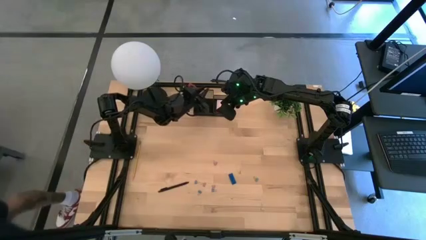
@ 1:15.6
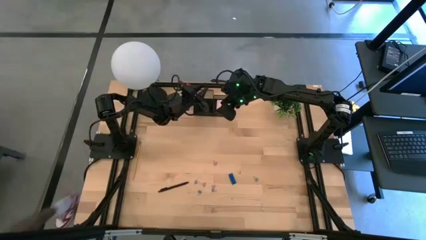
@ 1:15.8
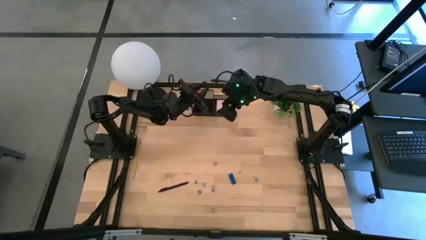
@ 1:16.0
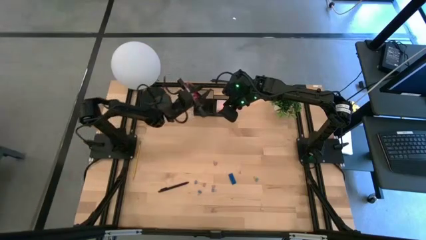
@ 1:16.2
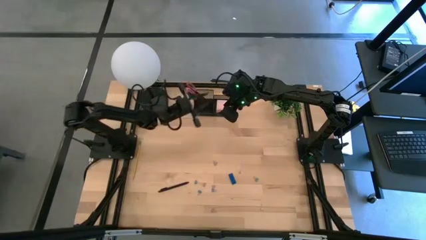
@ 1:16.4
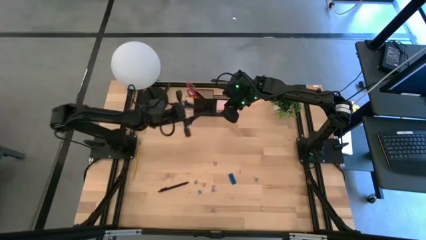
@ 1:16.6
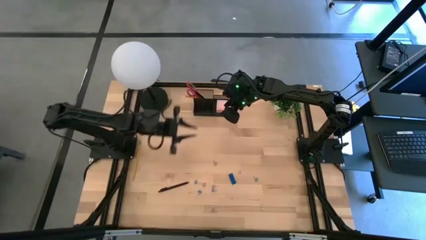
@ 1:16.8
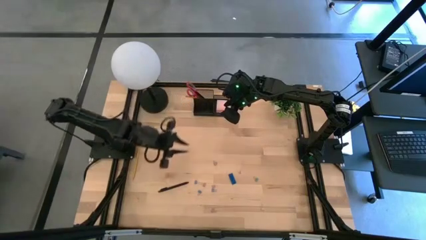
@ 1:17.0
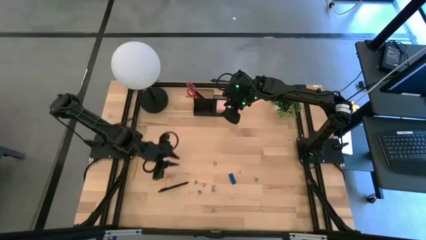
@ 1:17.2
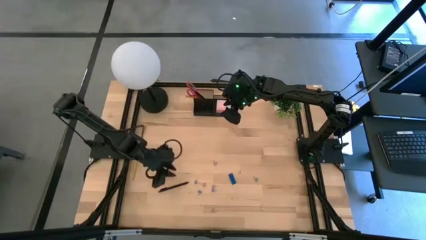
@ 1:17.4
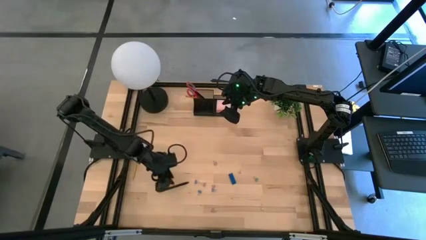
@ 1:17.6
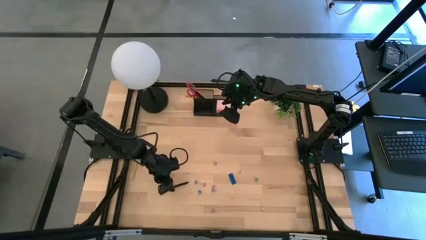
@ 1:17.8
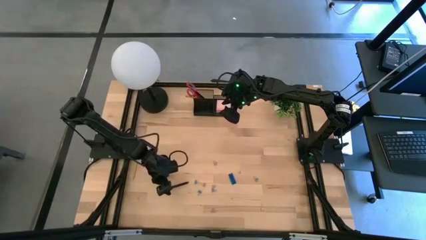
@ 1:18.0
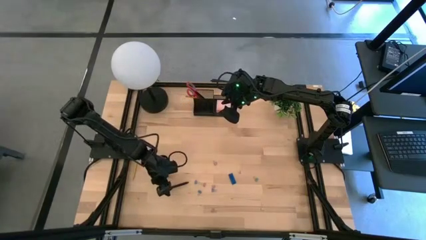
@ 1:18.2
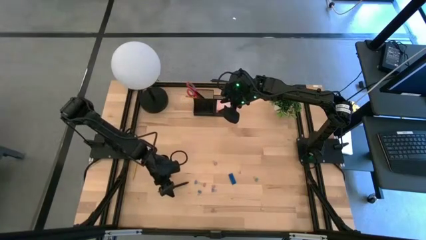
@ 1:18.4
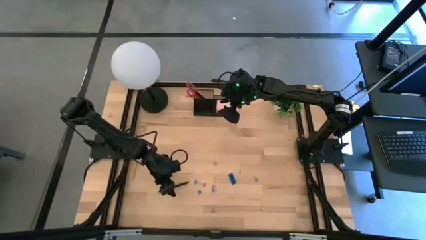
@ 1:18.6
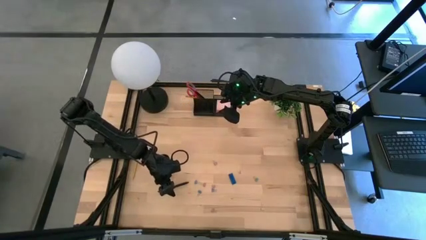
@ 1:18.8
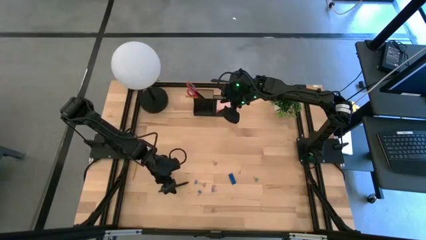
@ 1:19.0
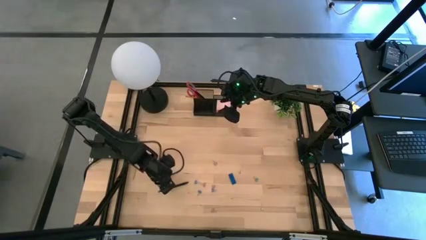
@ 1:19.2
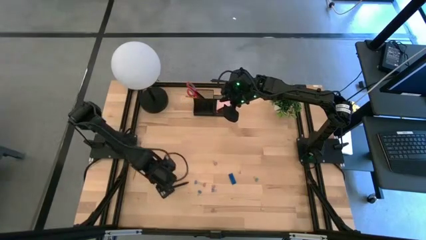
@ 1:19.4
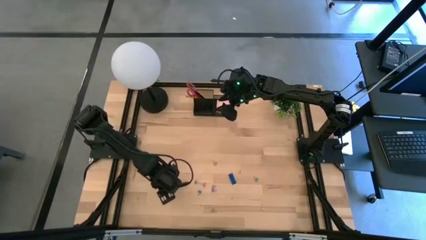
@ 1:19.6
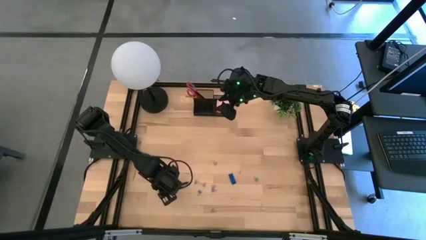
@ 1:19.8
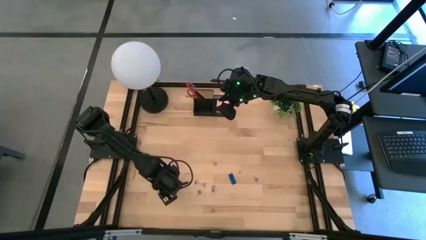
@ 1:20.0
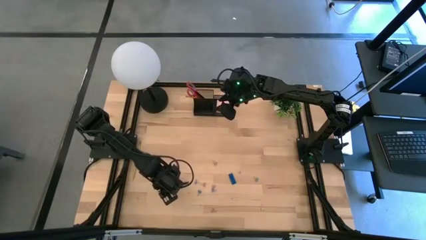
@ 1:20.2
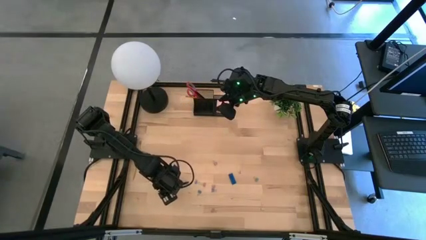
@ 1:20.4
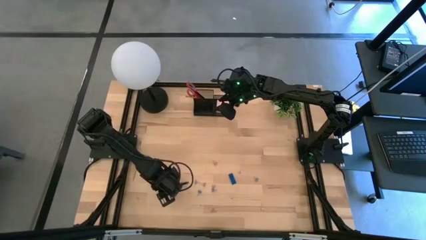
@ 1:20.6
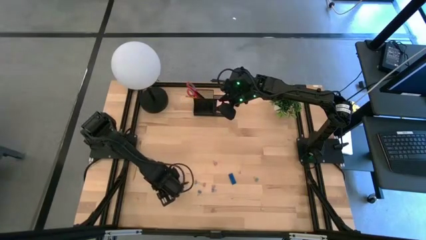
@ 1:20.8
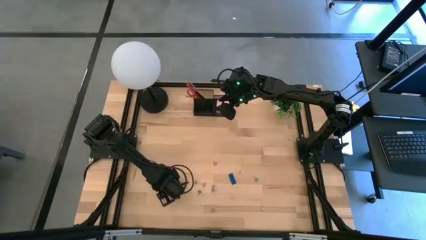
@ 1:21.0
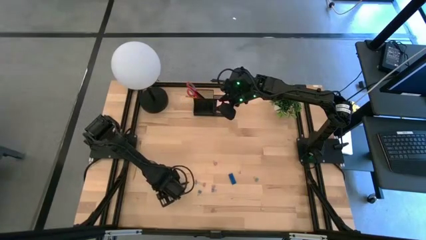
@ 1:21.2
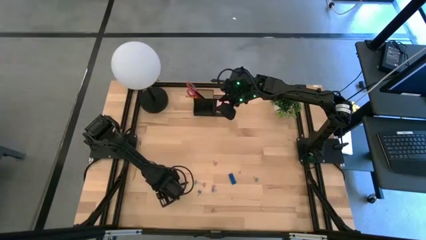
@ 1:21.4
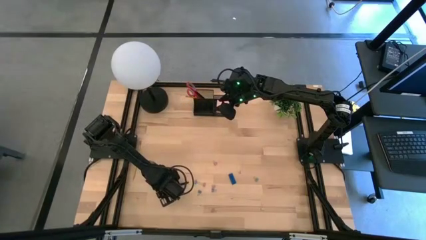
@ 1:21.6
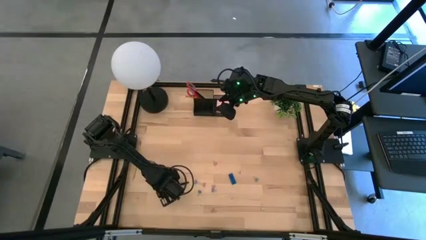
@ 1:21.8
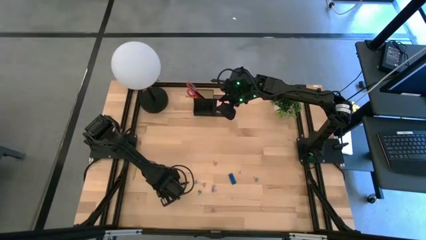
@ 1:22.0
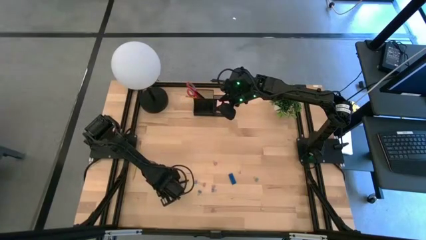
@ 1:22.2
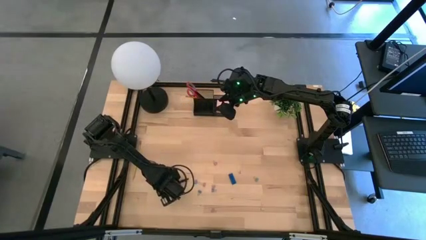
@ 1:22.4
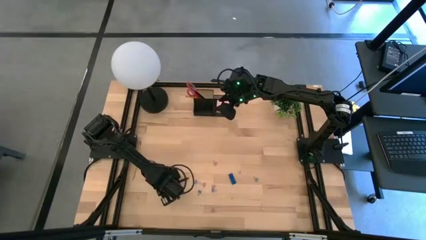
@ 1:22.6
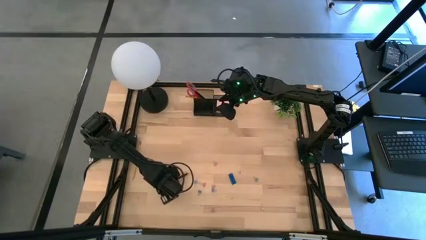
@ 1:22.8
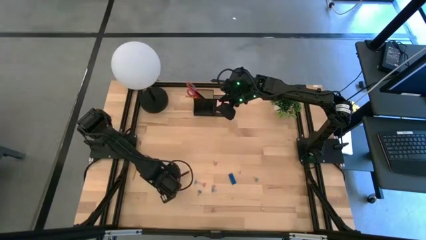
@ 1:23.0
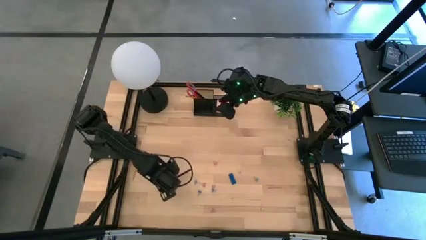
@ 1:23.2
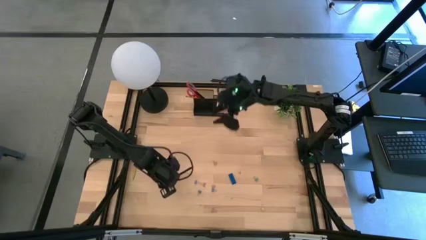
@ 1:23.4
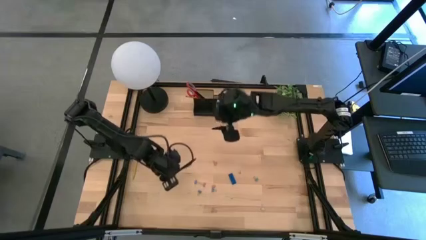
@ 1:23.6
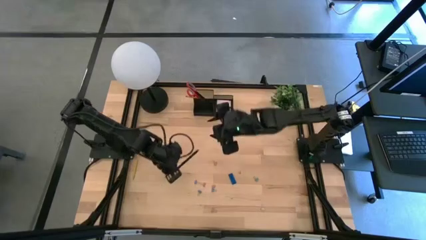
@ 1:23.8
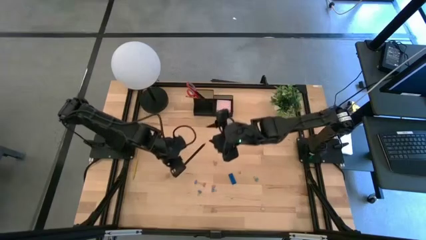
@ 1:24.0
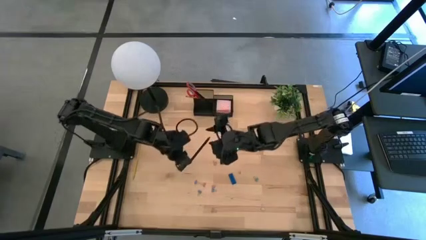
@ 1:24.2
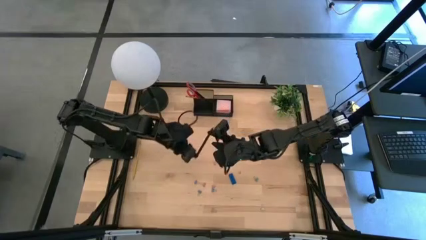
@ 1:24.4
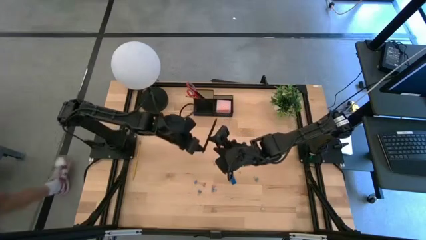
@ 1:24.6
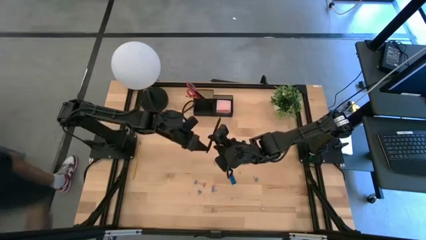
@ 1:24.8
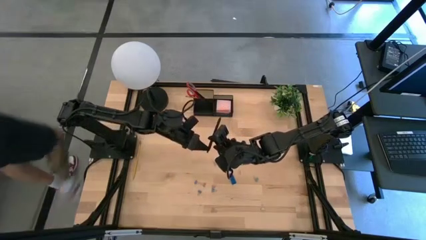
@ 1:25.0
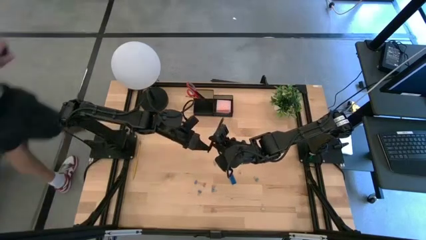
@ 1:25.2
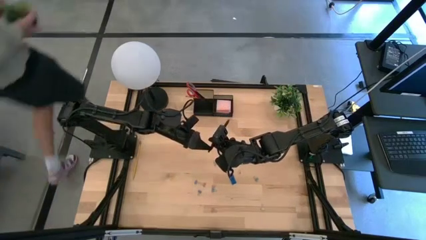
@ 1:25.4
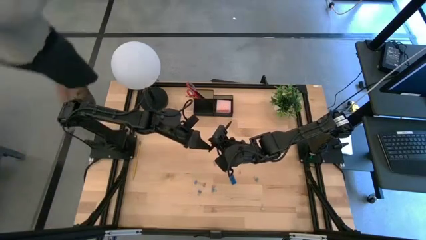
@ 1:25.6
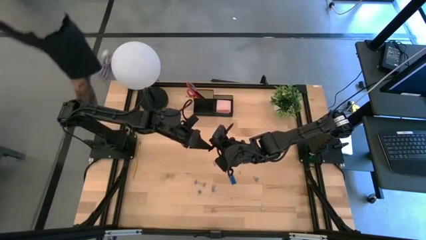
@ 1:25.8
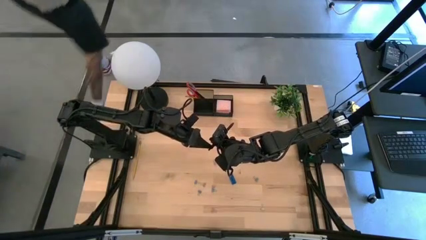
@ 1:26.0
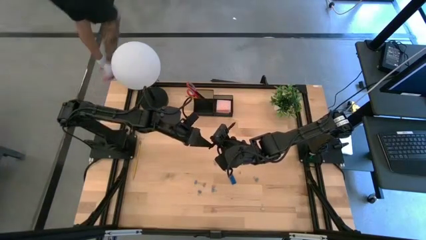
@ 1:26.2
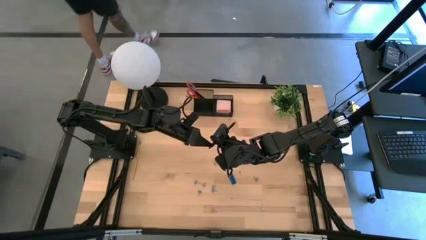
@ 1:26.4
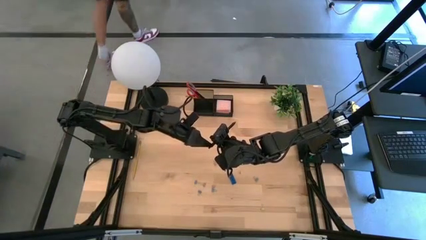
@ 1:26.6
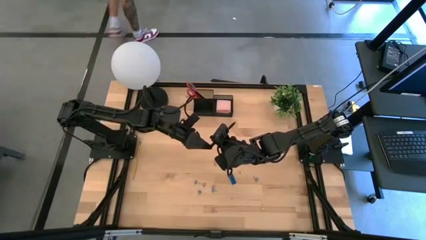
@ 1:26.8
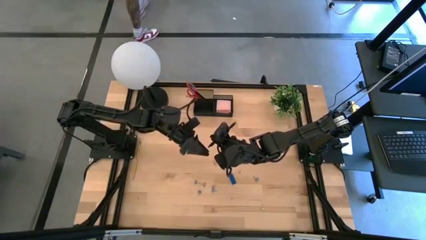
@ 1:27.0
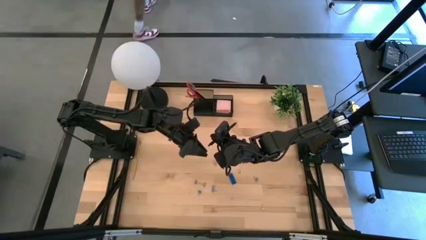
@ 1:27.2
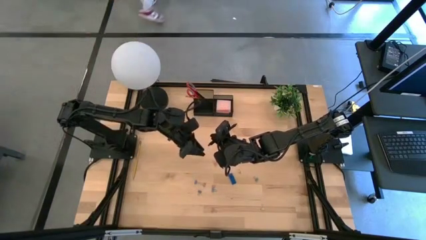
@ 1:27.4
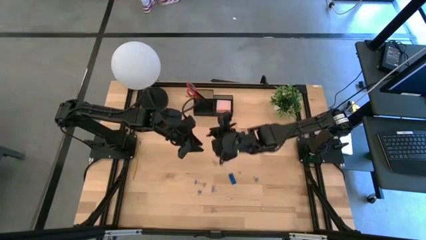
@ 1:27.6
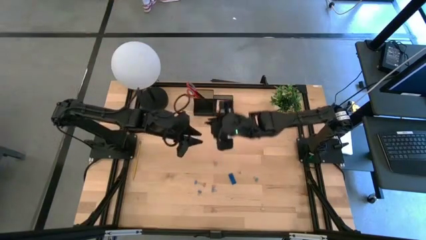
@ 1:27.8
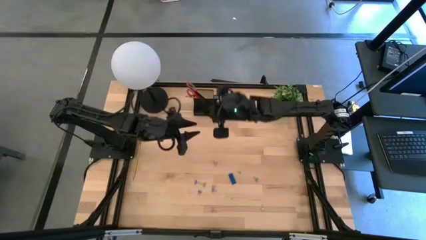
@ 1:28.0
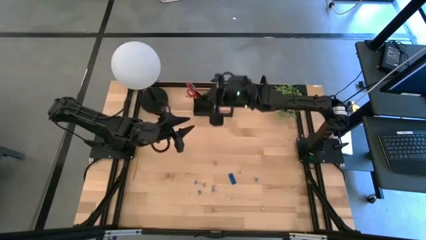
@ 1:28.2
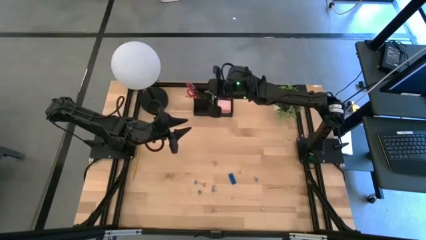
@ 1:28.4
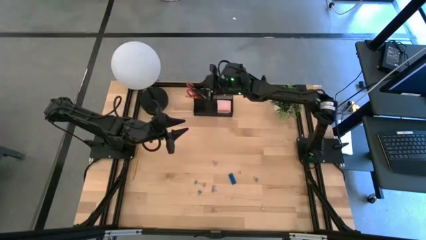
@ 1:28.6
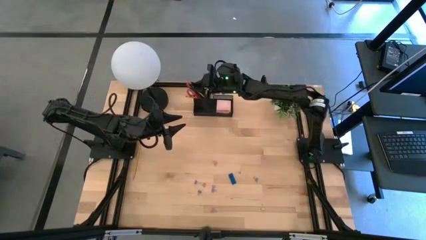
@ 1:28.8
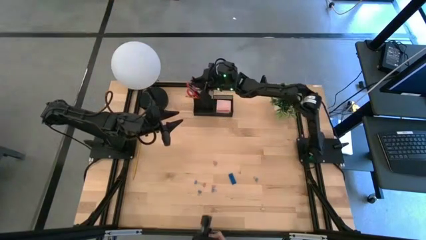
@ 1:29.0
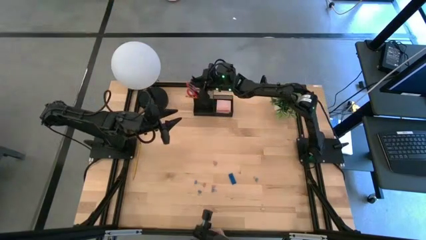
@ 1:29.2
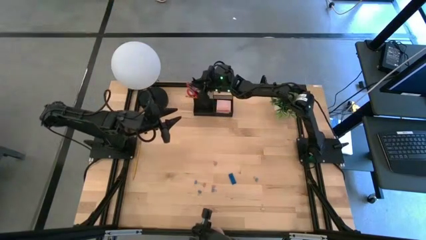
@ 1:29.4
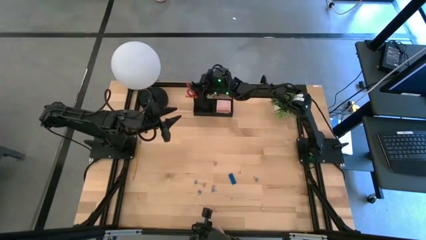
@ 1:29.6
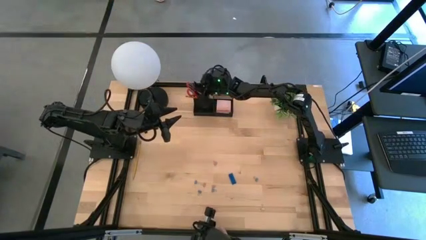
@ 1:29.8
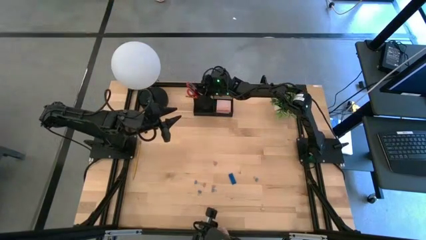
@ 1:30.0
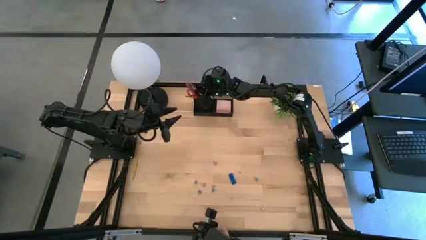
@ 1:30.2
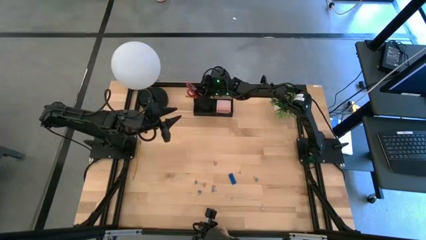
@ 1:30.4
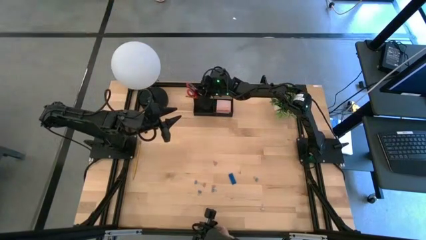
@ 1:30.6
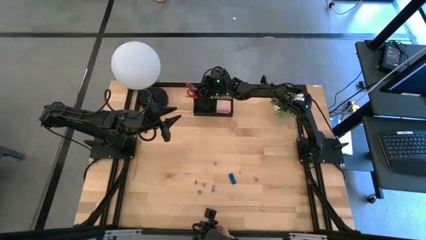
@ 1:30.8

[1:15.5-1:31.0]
Task: Pick and place office supplies into organizer
Put the black pen into the black desk organizer
